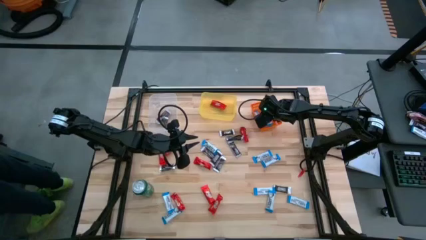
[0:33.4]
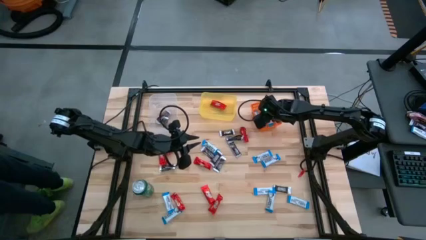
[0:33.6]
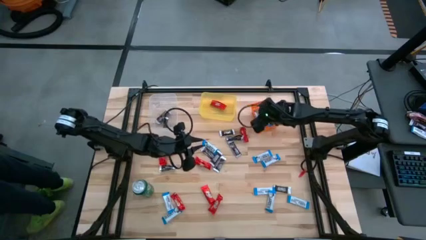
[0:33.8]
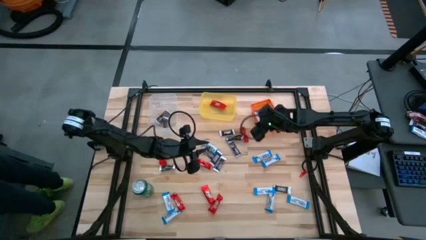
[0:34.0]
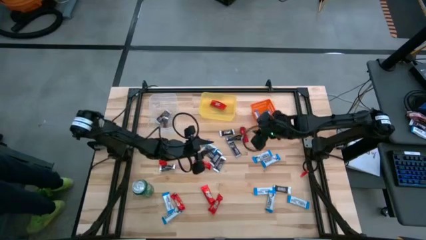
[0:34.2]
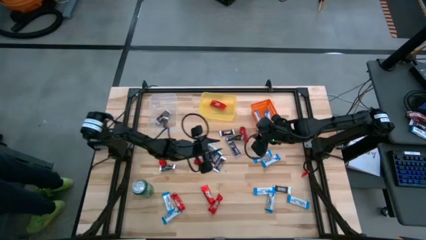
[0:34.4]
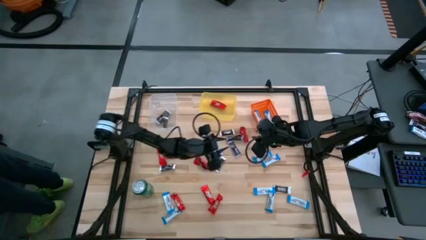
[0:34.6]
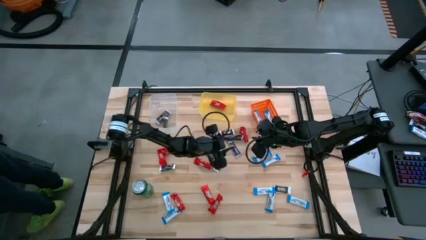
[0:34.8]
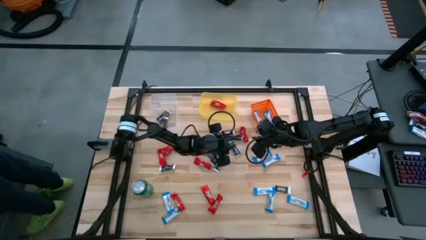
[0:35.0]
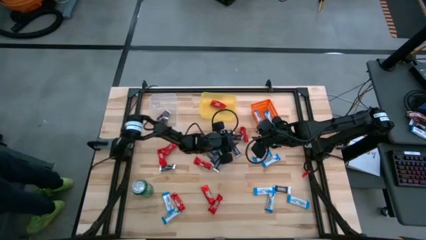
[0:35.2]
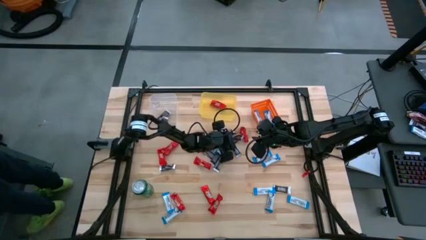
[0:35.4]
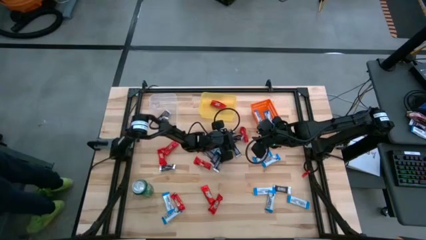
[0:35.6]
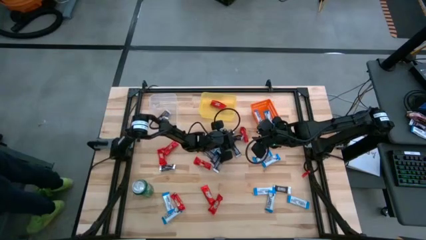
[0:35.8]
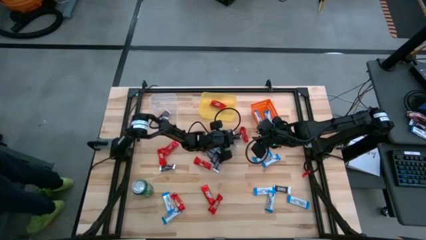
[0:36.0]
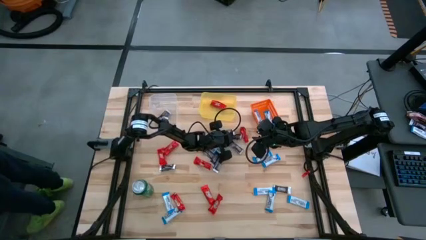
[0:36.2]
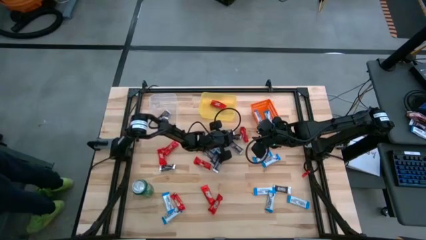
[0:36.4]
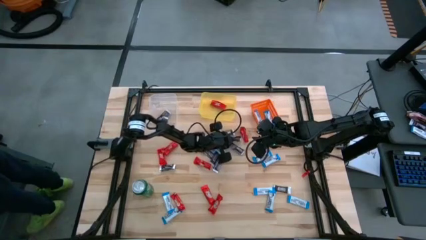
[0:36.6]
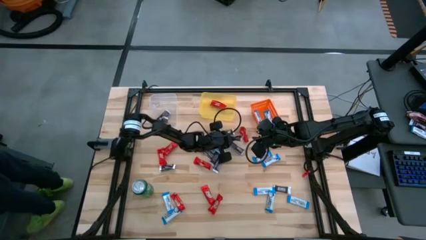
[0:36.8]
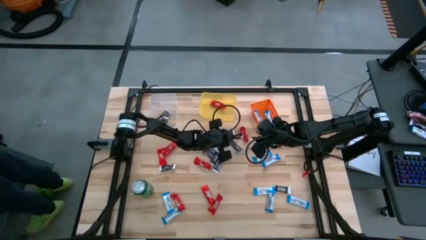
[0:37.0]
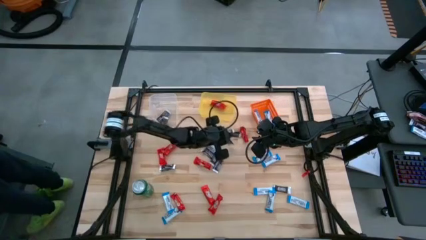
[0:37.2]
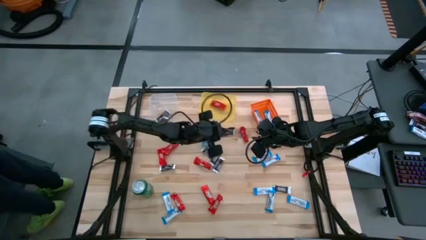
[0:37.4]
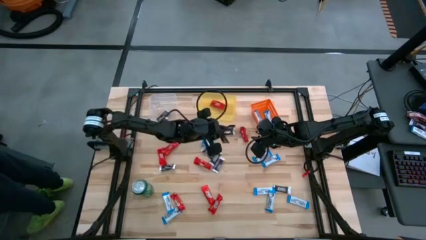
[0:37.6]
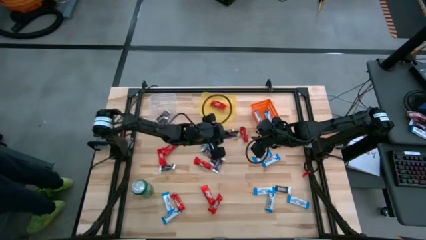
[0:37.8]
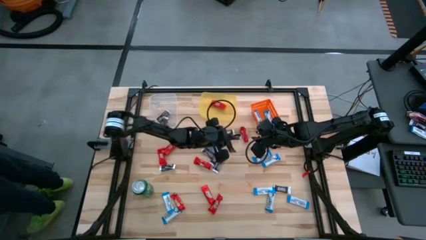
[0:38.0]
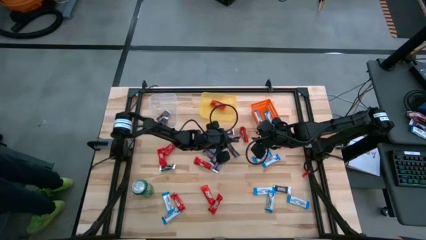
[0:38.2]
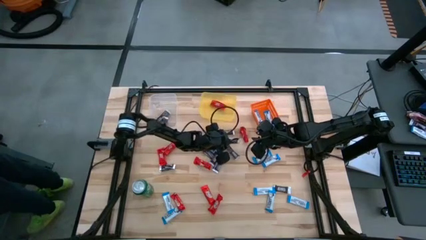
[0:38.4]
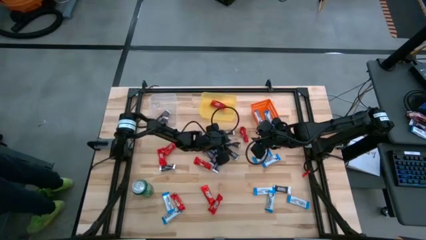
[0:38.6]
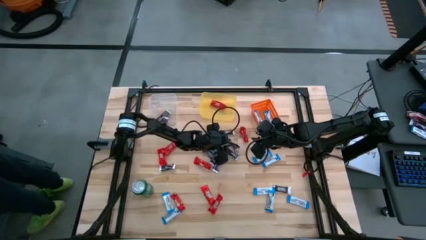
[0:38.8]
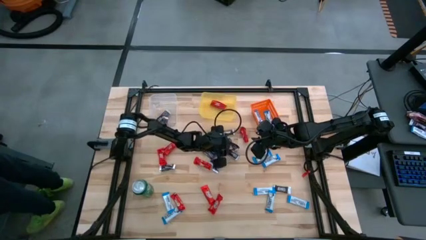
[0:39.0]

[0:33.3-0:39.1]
Task: Sort candy
Put the brown chocolate bar into the transparent bin

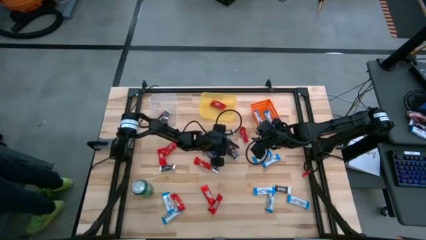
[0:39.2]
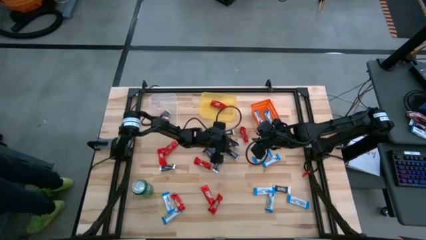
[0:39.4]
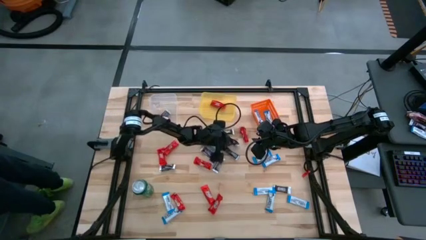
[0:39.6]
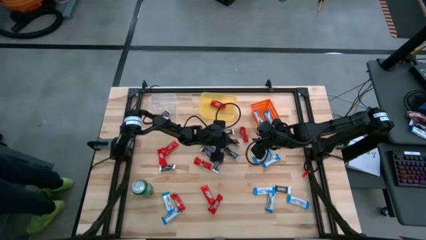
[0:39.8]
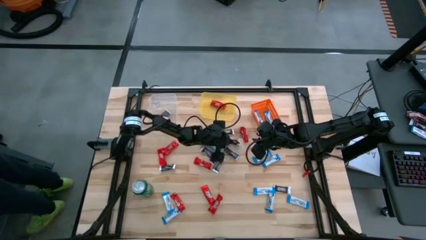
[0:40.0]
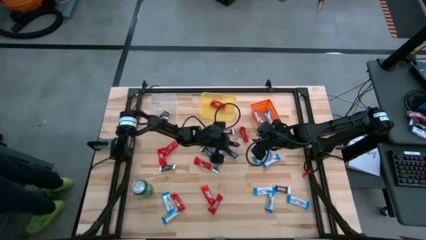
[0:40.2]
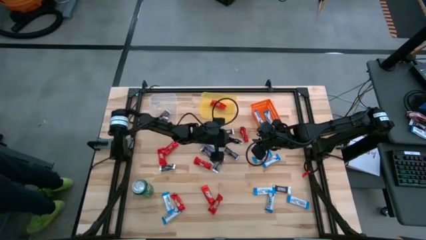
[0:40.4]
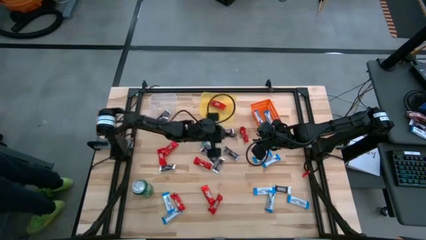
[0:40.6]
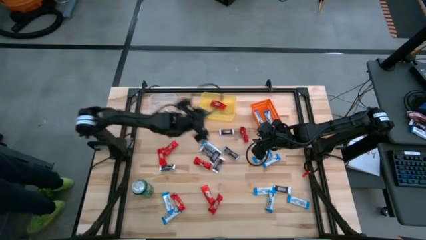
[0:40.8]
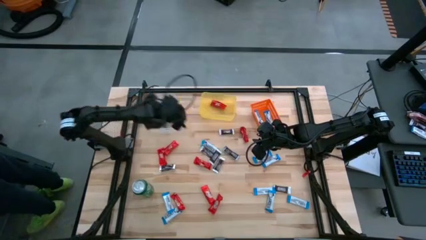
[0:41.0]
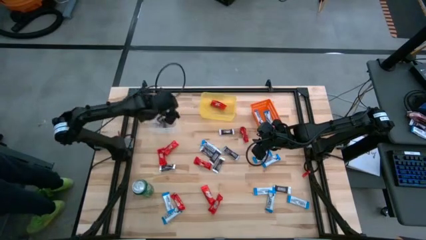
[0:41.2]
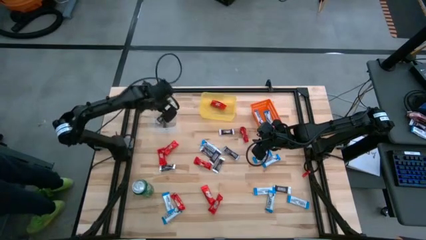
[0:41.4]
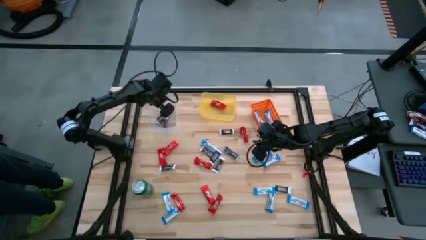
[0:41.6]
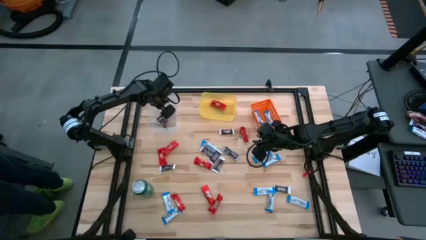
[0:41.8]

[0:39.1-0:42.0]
Put the brown chocolate bar into the transparent bin

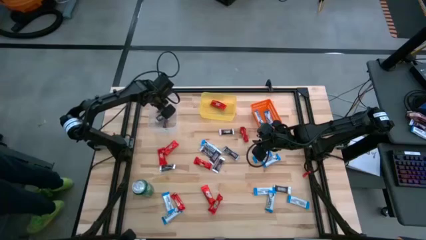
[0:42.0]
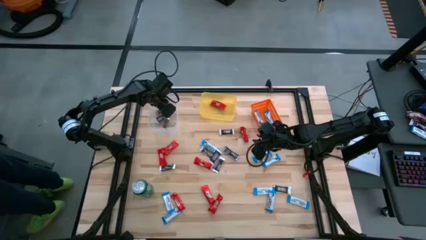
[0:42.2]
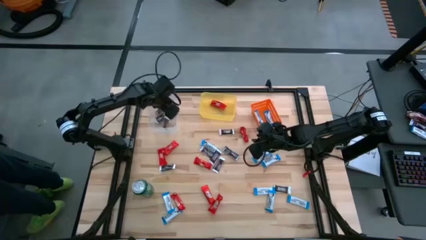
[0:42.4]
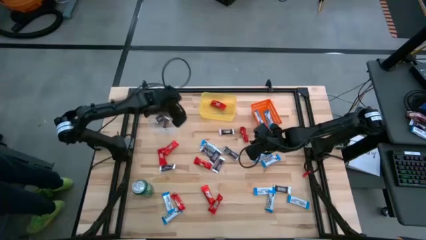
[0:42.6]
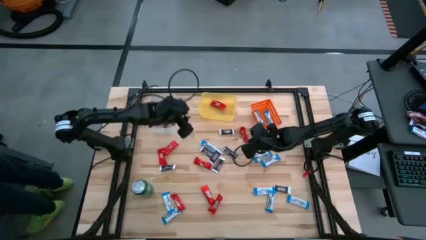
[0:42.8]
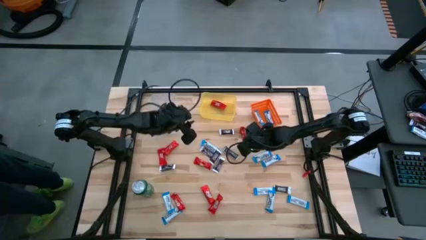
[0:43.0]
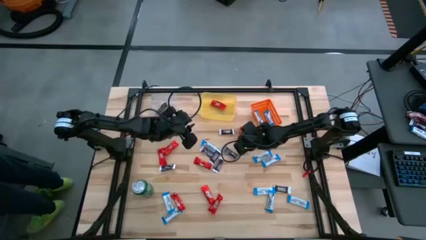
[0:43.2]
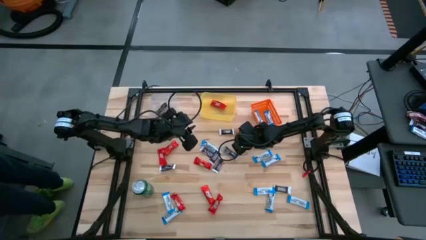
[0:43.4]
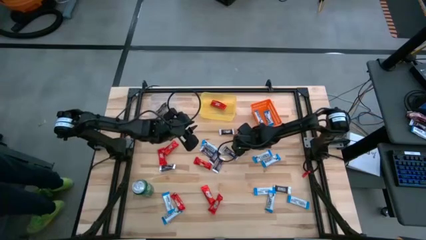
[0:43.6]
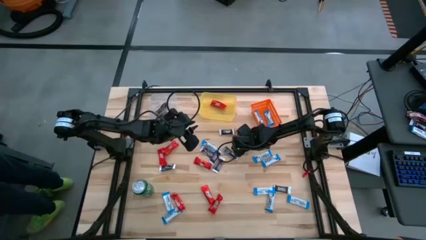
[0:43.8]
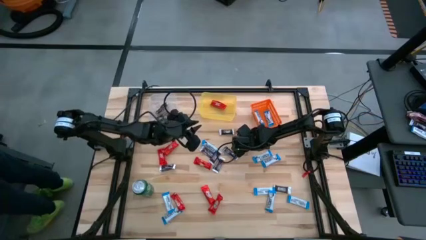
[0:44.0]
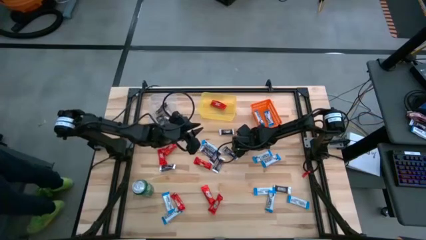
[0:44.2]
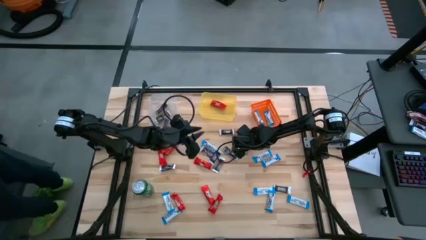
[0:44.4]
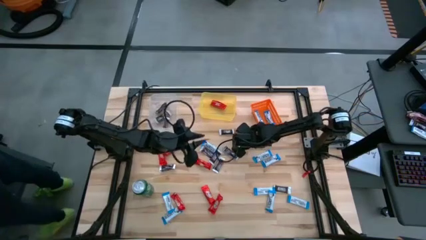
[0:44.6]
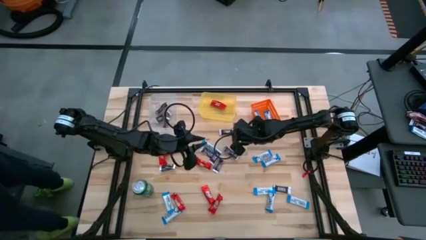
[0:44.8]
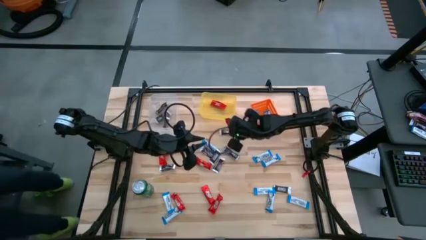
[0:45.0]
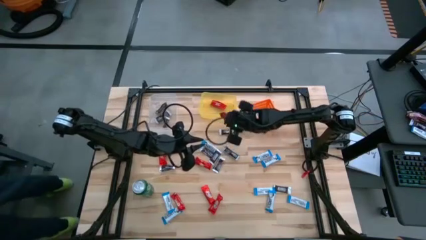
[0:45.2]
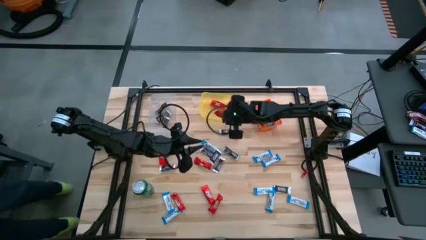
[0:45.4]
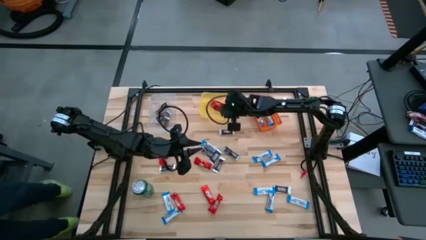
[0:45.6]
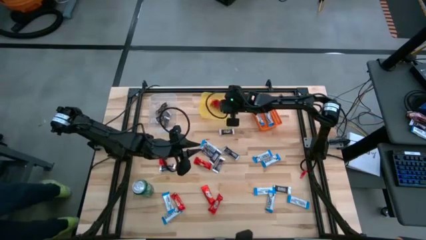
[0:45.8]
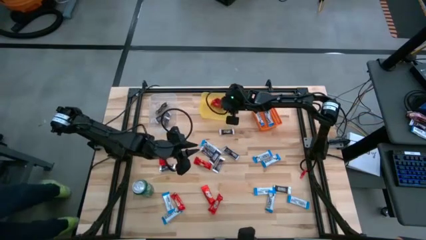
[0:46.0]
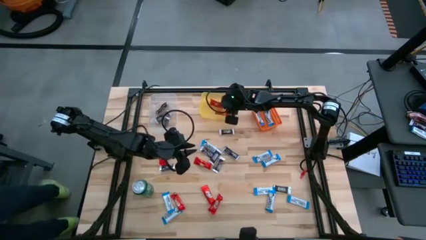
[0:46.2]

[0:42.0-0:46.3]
Put the red chocolate bar into the yellow bin

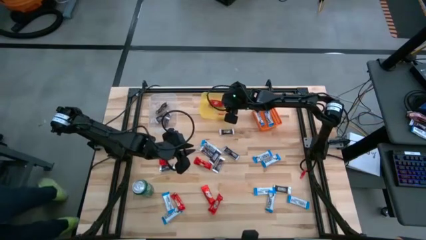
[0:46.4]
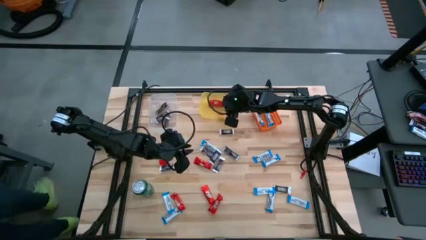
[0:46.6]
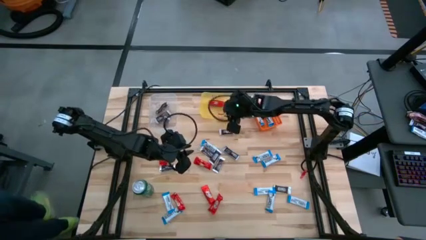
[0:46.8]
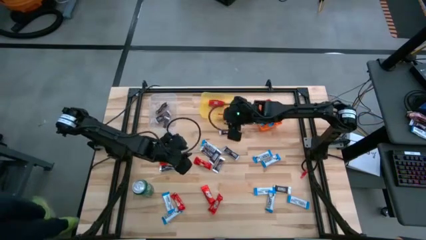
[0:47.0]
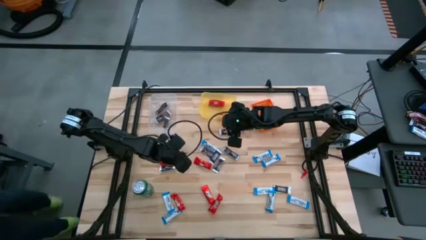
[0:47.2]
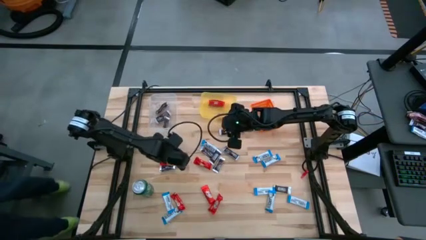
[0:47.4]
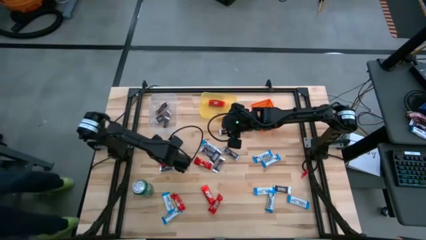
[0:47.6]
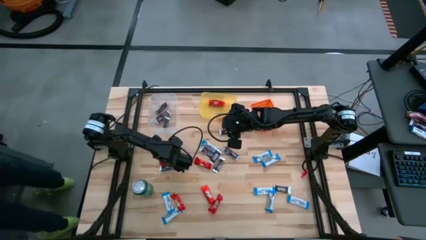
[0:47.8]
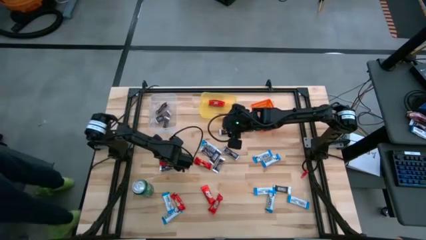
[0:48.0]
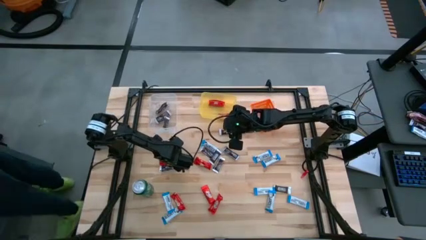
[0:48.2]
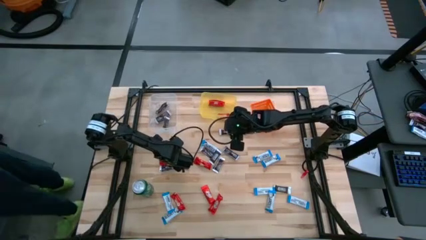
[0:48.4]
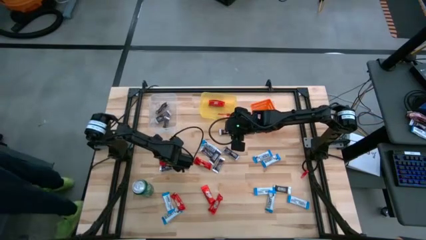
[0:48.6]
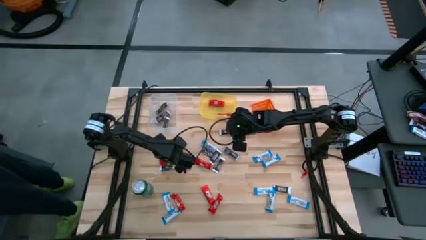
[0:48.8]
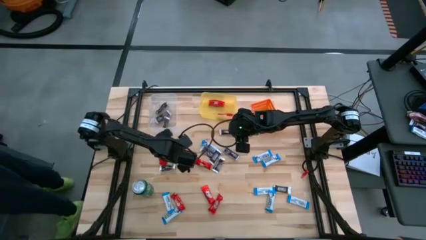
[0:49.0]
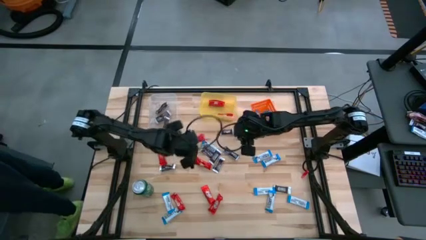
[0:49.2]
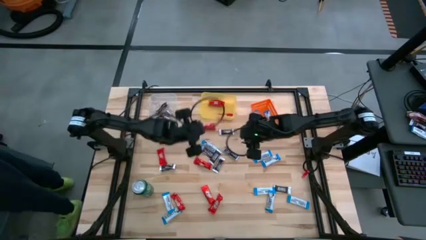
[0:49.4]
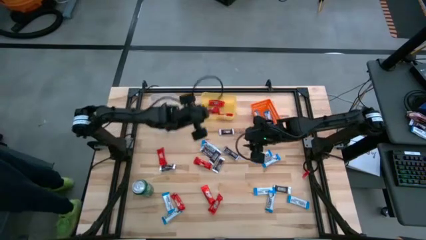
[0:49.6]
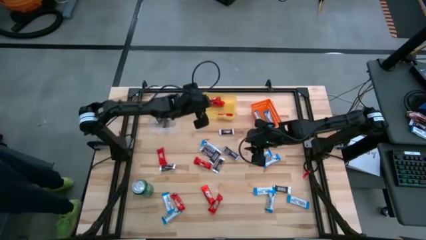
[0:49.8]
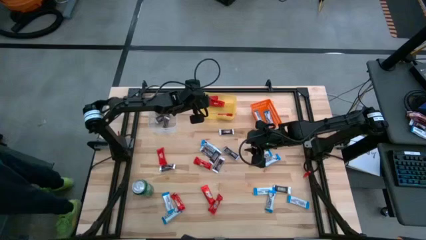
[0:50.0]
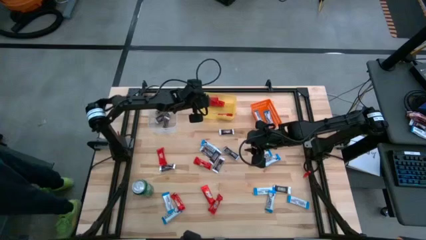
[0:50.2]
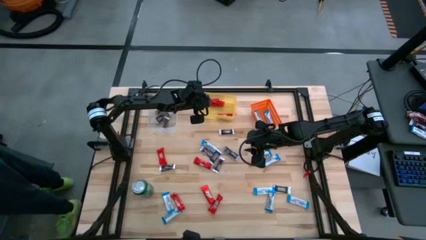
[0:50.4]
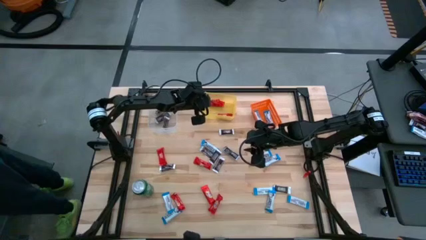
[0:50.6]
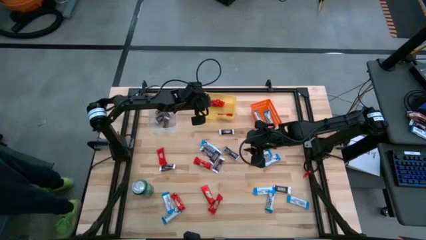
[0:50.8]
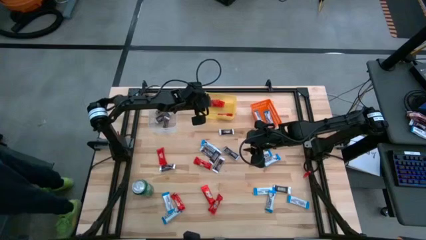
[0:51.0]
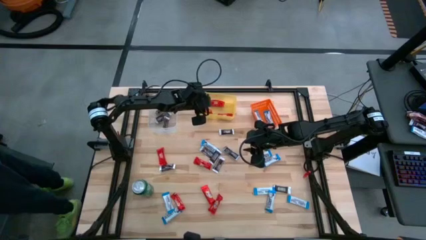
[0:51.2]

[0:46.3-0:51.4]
Put the red chocolate bar into the yellow bin
